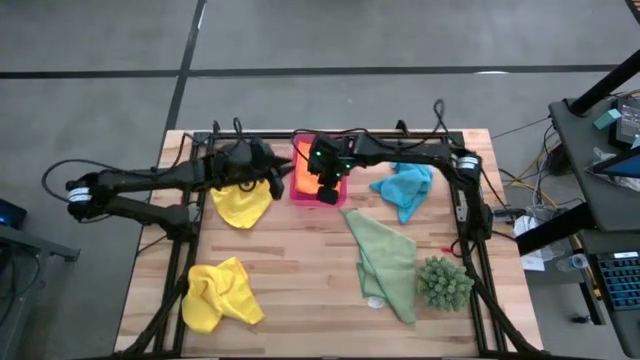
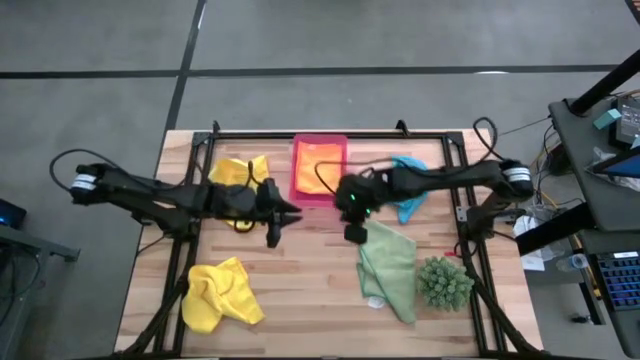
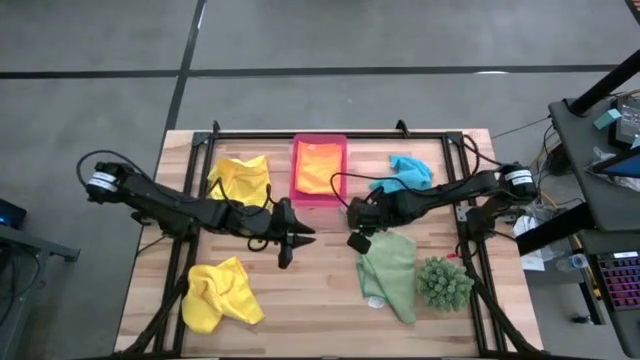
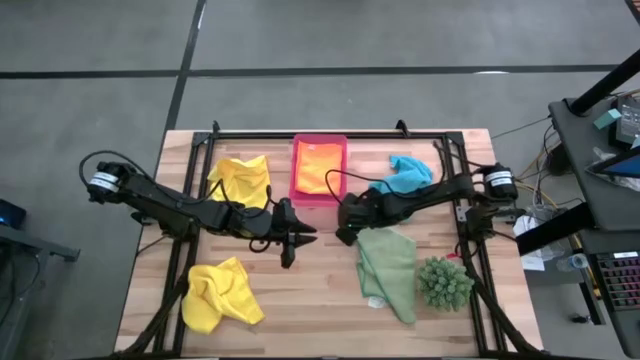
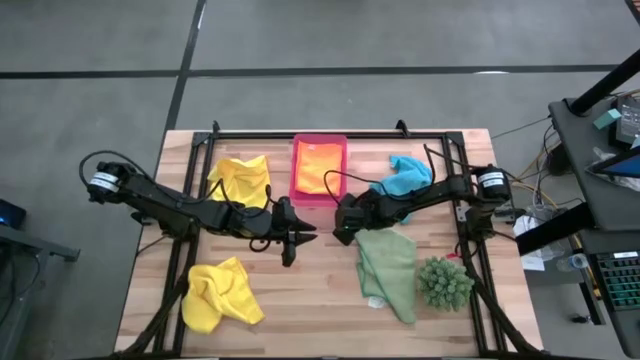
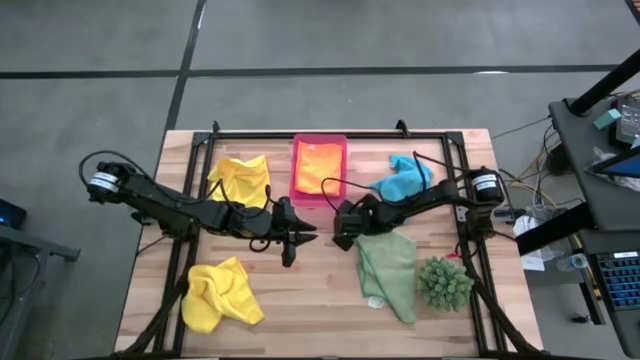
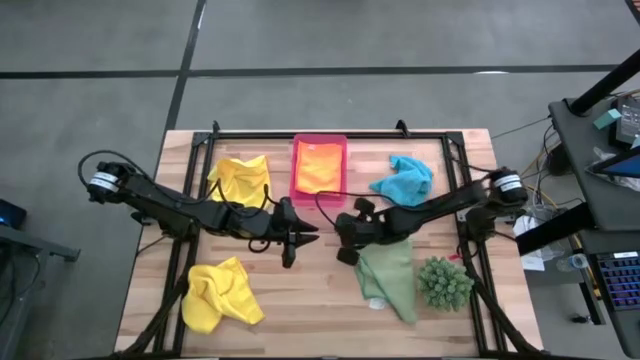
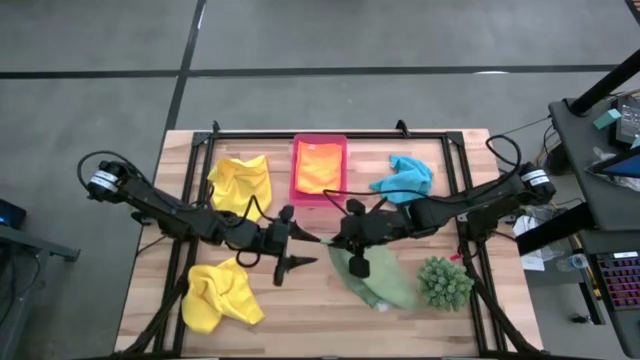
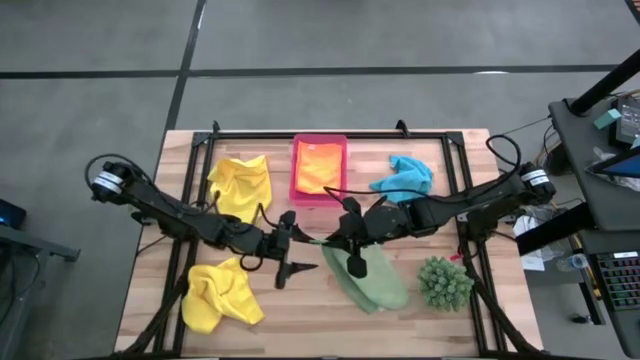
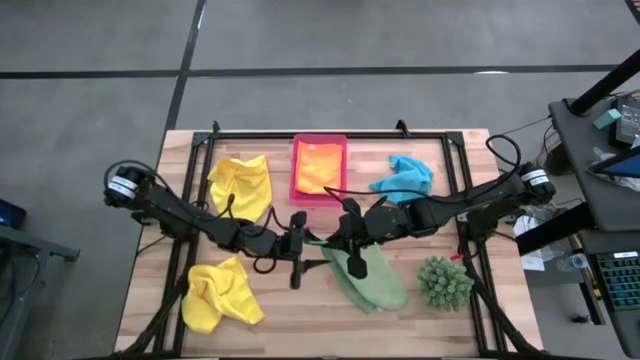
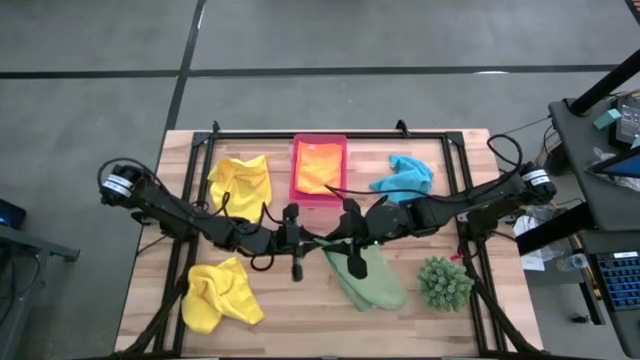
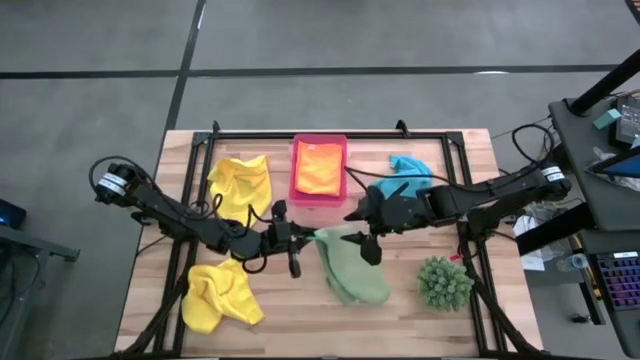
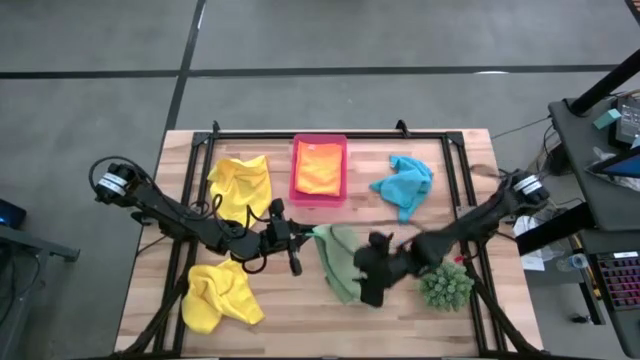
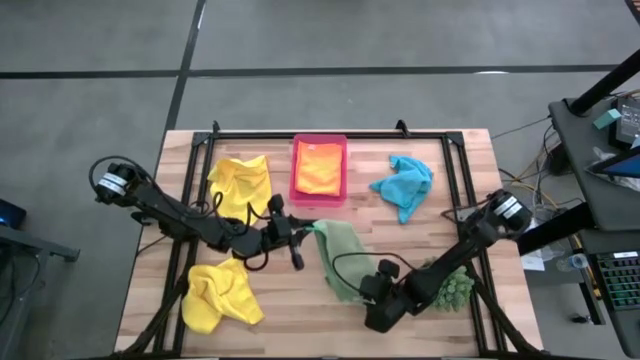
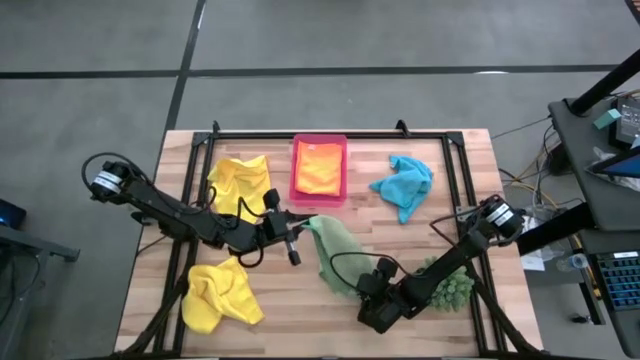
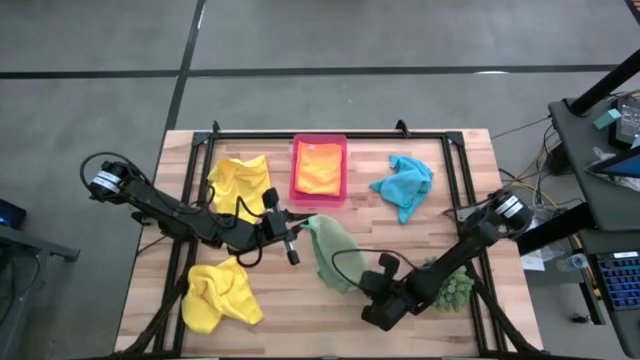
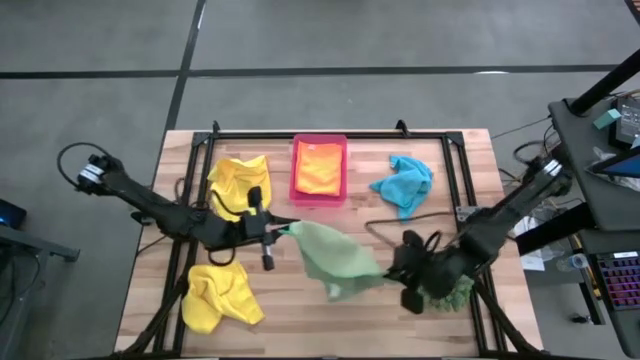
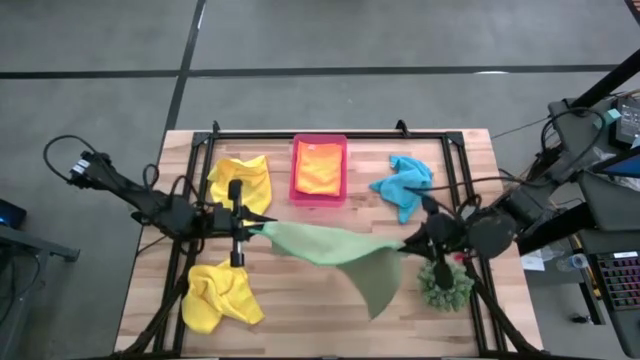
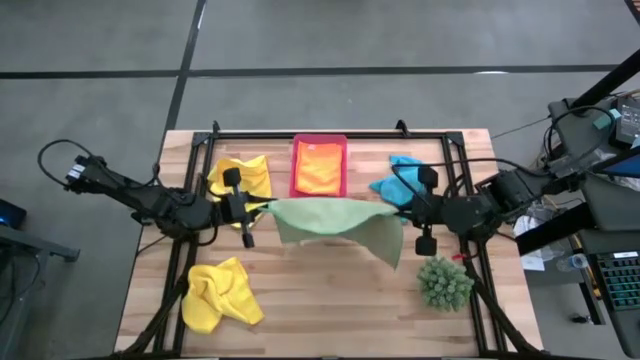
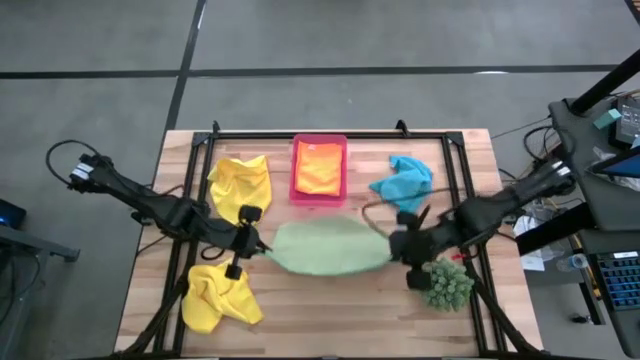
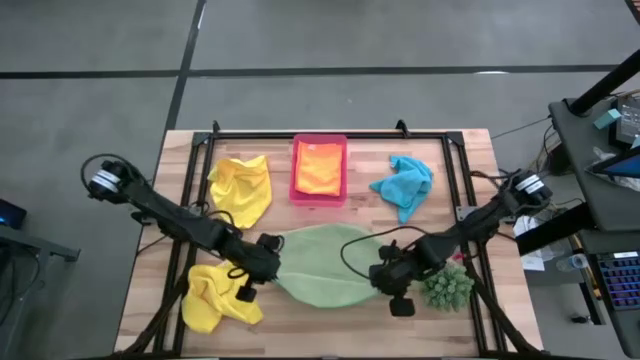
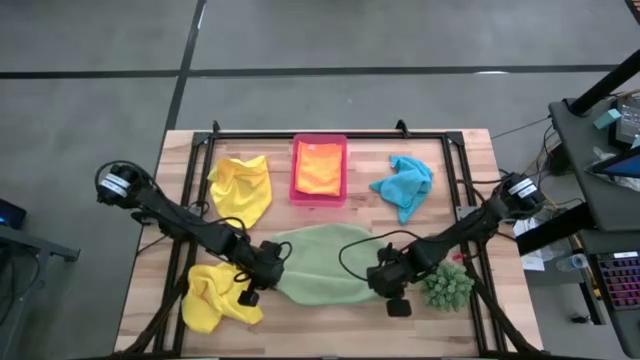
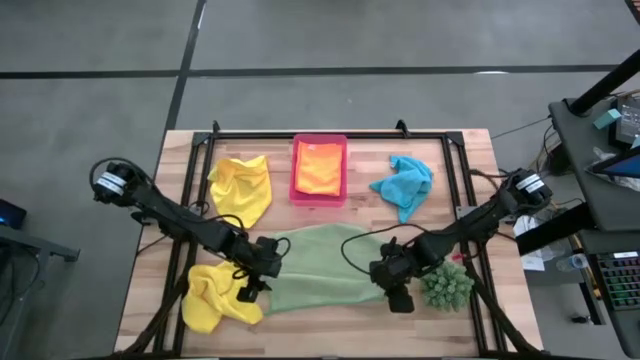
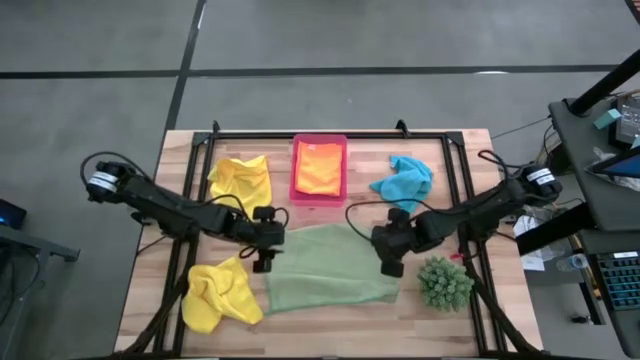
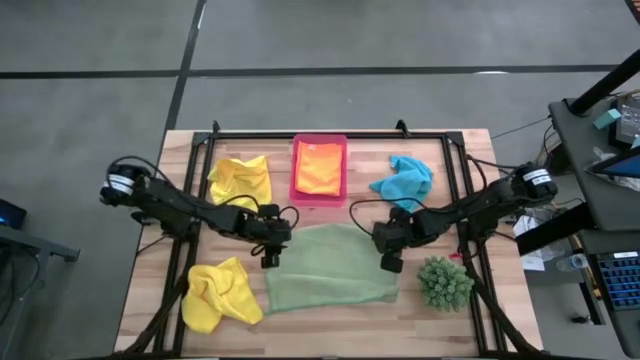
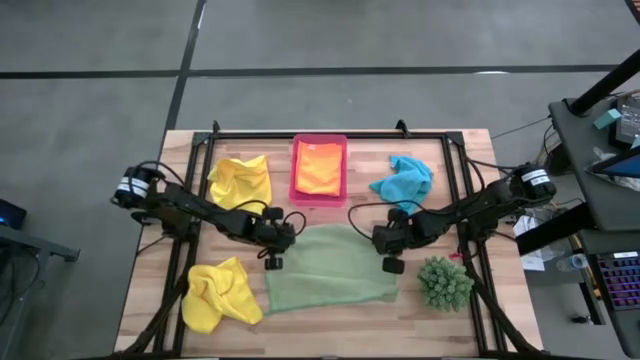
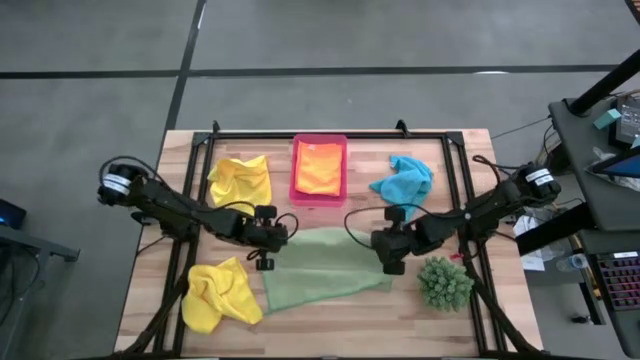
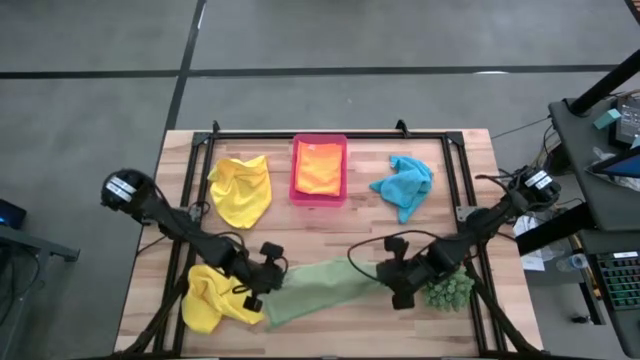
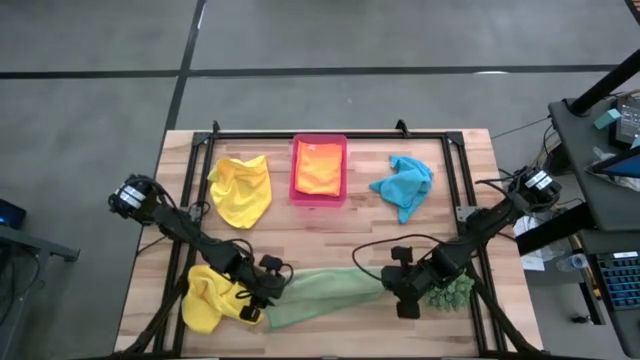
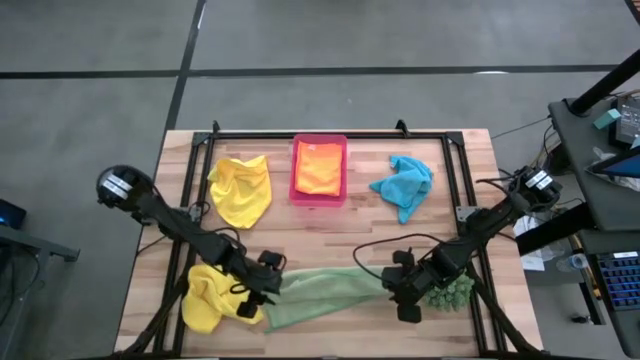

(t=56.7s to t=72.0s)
Task: Fold microfiber towels
Fold the green towel
